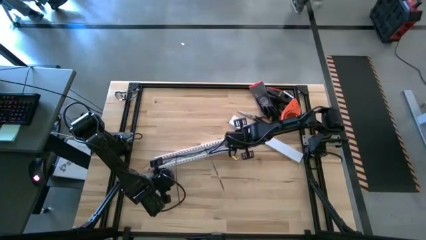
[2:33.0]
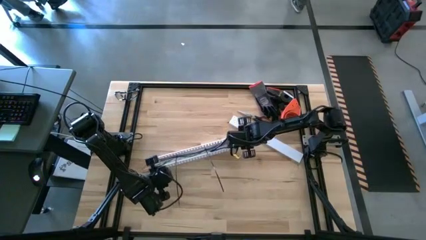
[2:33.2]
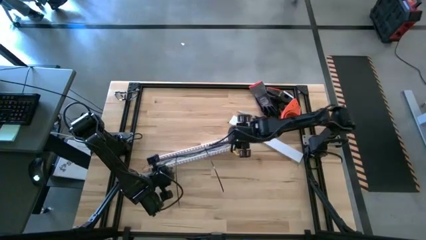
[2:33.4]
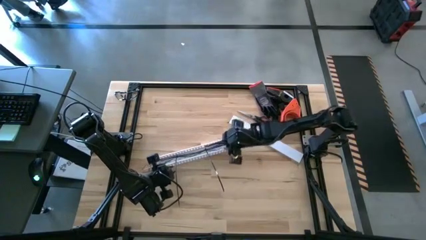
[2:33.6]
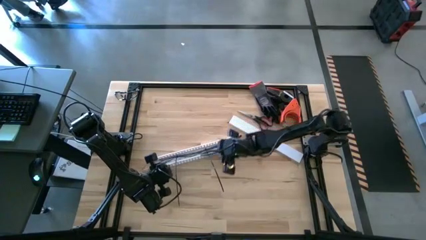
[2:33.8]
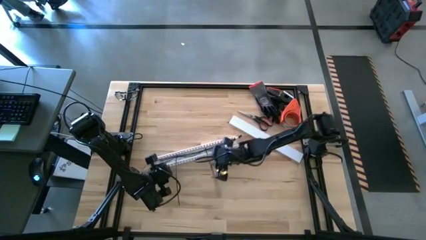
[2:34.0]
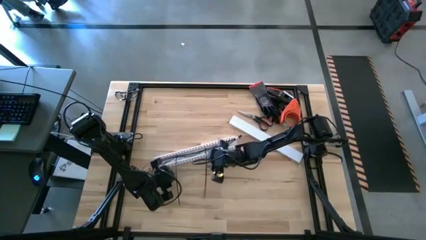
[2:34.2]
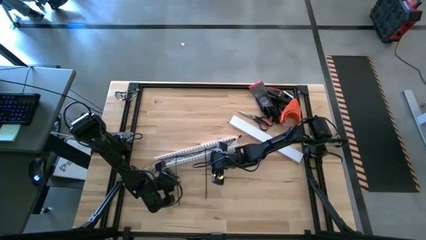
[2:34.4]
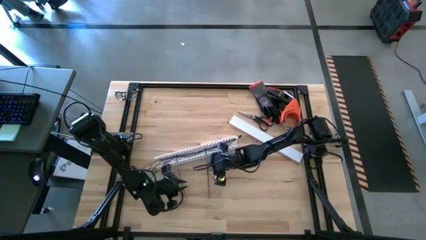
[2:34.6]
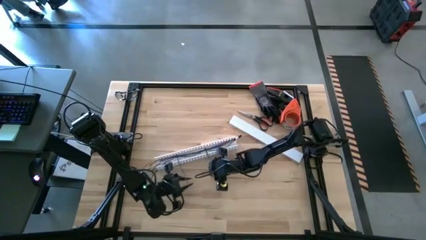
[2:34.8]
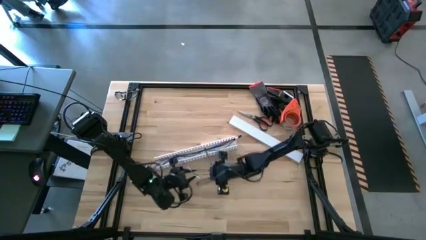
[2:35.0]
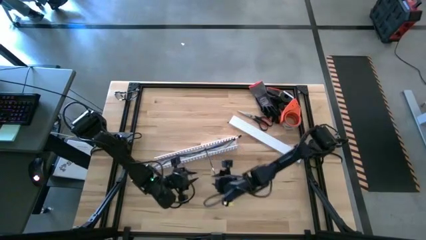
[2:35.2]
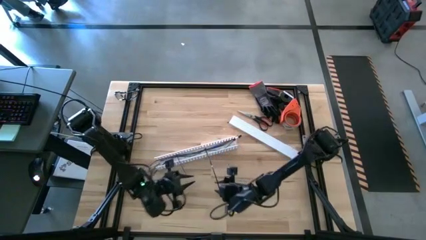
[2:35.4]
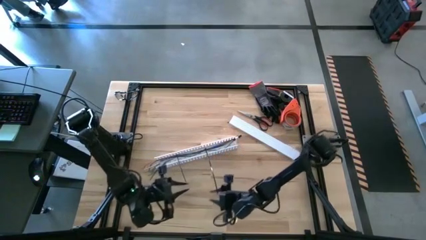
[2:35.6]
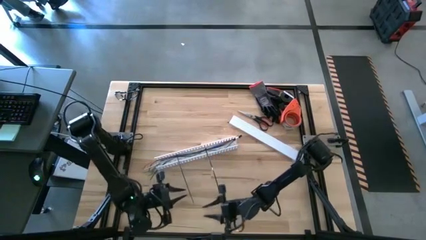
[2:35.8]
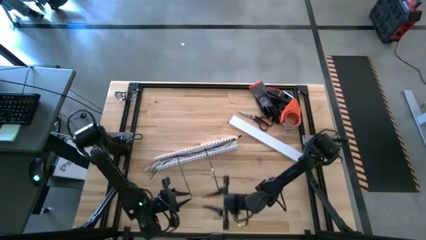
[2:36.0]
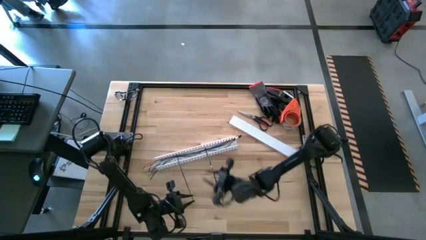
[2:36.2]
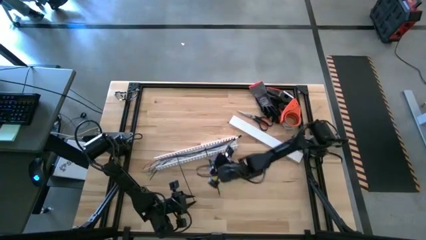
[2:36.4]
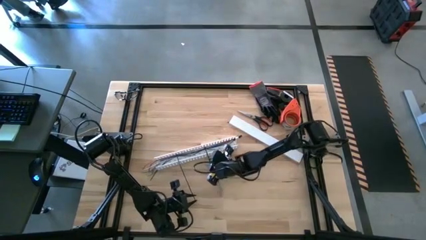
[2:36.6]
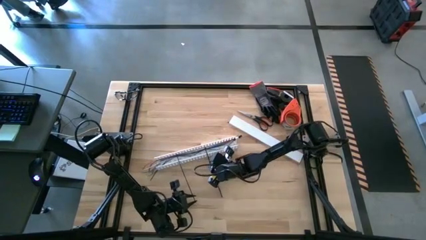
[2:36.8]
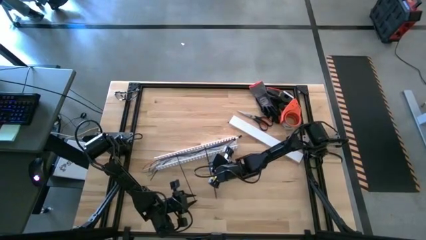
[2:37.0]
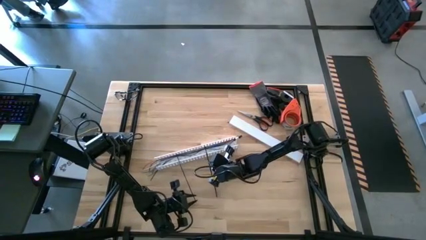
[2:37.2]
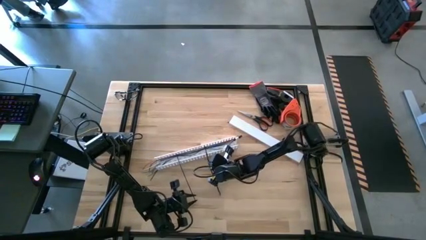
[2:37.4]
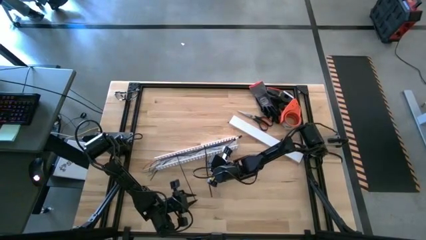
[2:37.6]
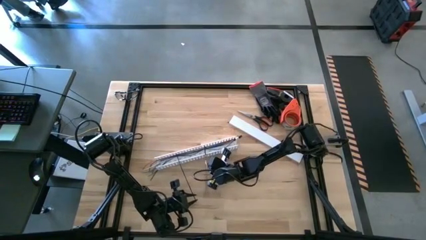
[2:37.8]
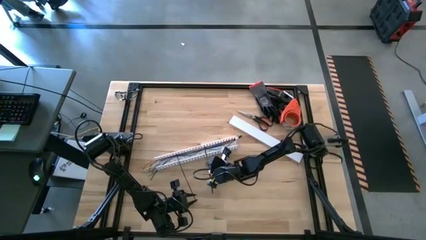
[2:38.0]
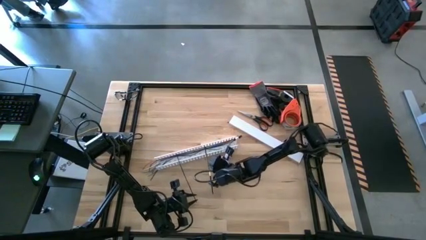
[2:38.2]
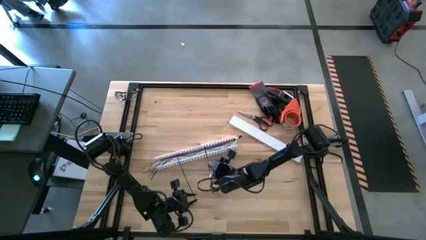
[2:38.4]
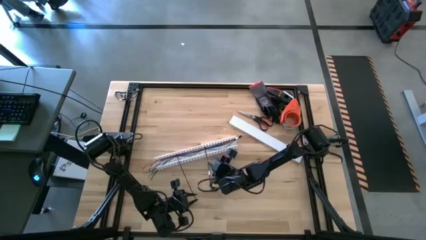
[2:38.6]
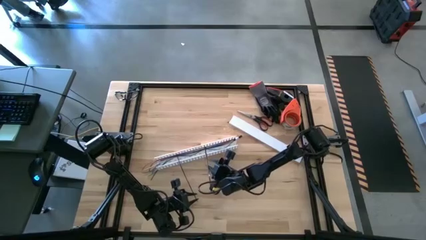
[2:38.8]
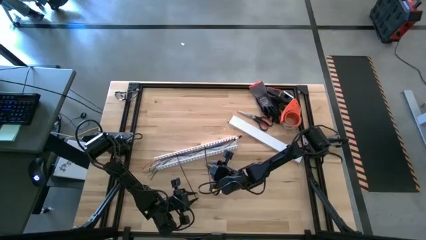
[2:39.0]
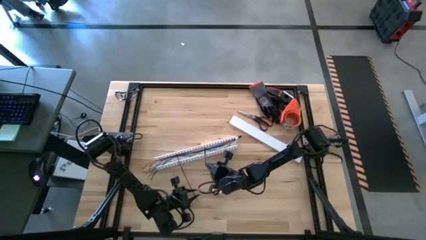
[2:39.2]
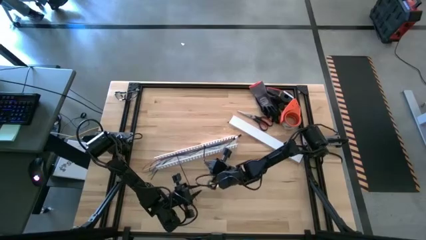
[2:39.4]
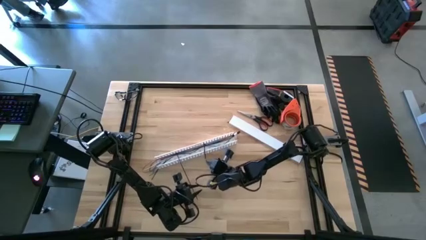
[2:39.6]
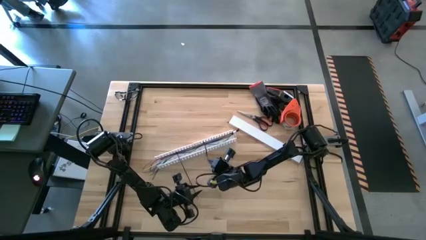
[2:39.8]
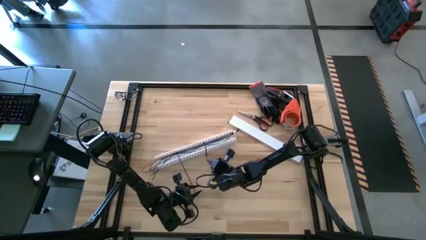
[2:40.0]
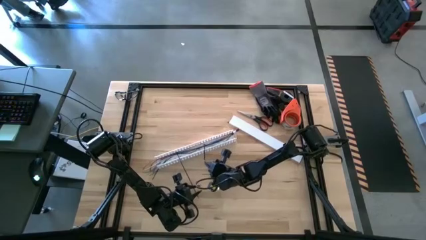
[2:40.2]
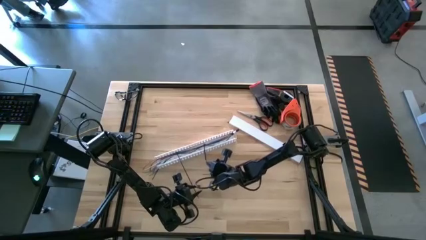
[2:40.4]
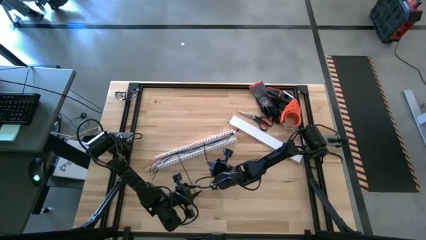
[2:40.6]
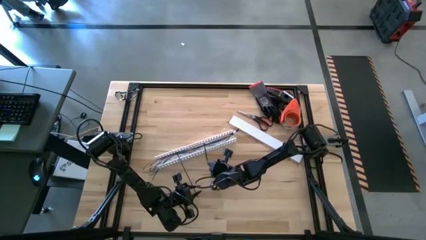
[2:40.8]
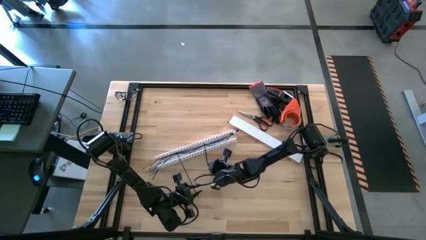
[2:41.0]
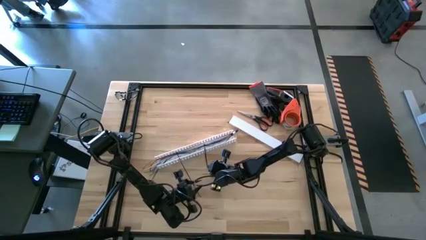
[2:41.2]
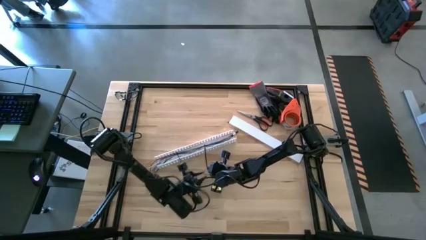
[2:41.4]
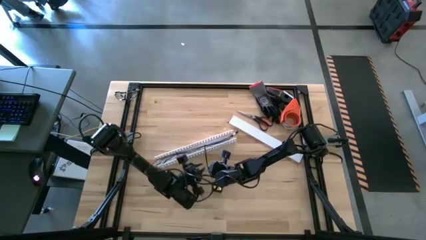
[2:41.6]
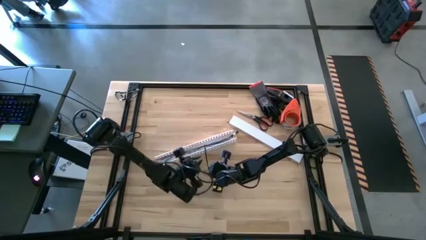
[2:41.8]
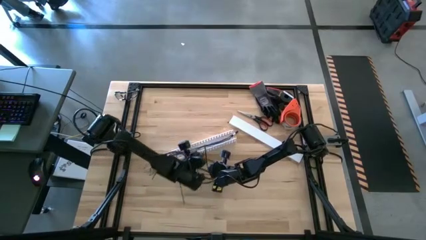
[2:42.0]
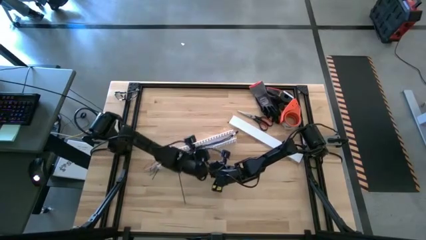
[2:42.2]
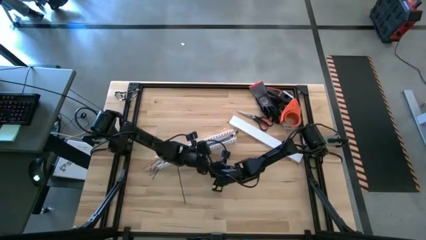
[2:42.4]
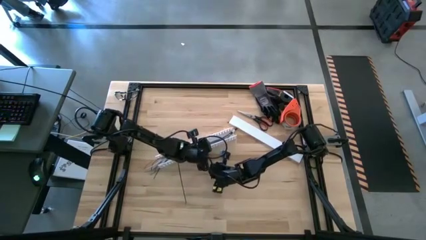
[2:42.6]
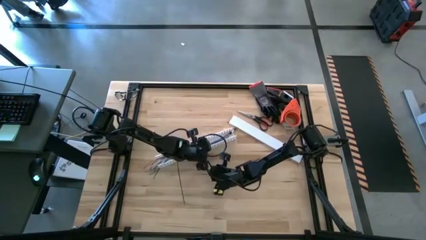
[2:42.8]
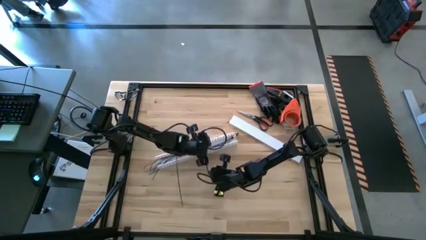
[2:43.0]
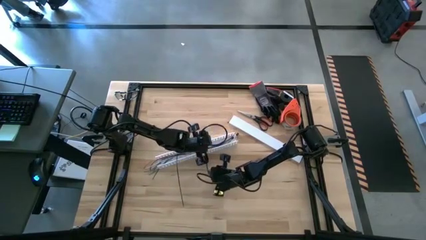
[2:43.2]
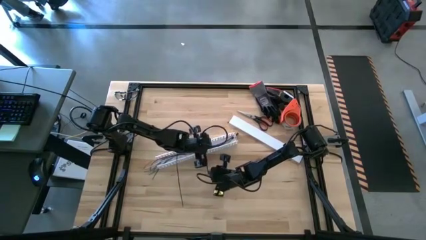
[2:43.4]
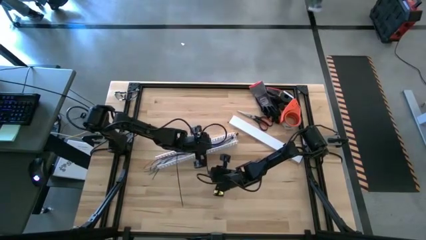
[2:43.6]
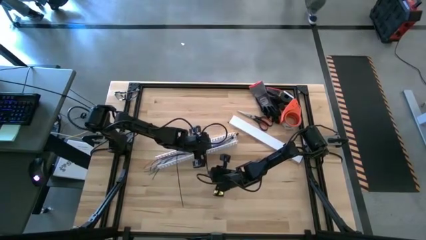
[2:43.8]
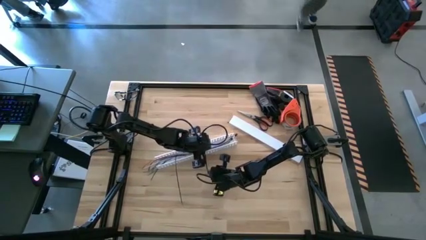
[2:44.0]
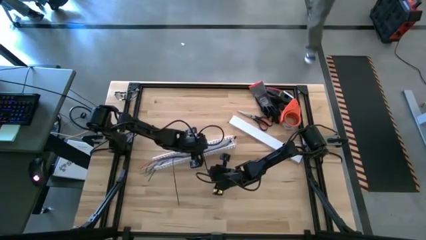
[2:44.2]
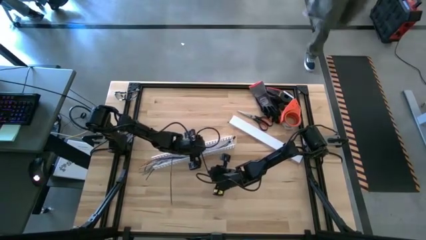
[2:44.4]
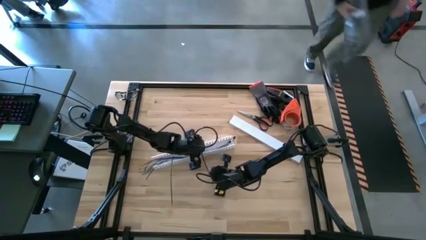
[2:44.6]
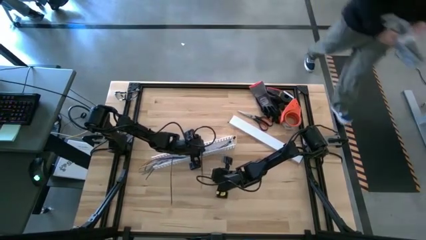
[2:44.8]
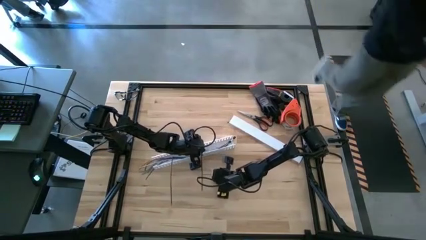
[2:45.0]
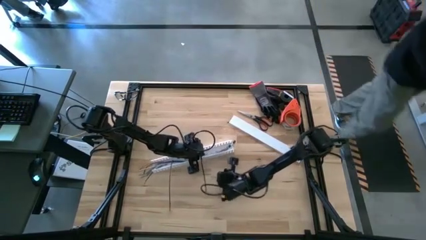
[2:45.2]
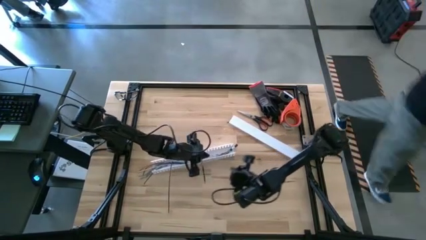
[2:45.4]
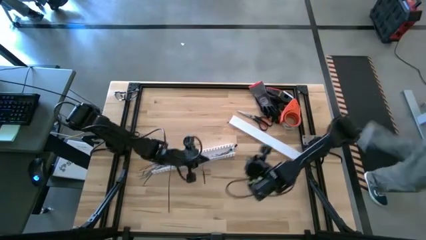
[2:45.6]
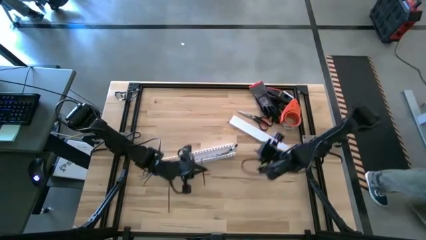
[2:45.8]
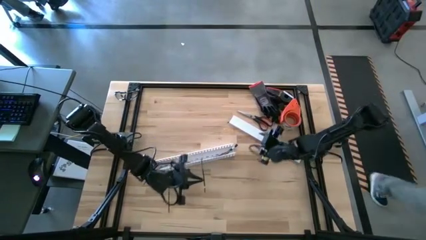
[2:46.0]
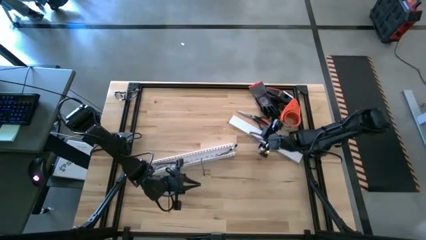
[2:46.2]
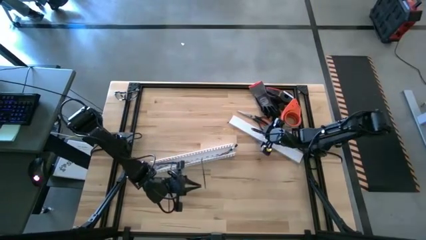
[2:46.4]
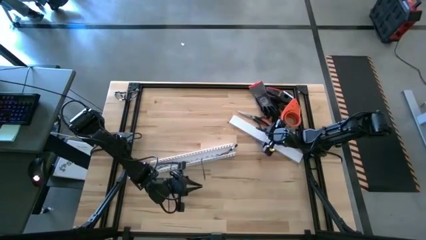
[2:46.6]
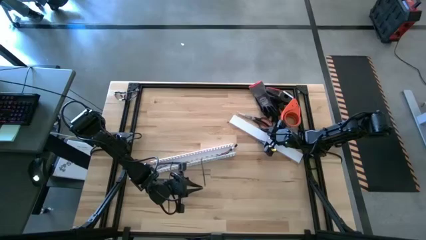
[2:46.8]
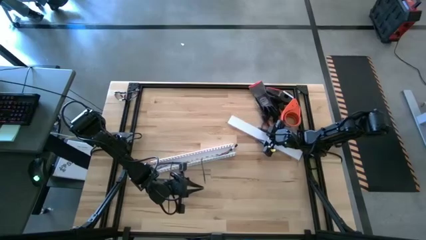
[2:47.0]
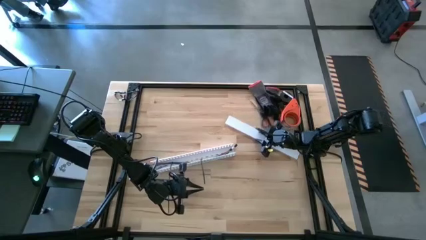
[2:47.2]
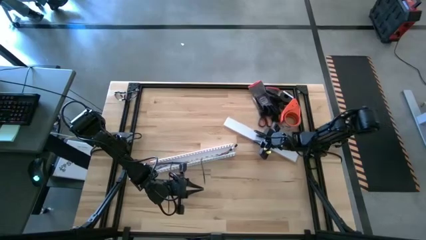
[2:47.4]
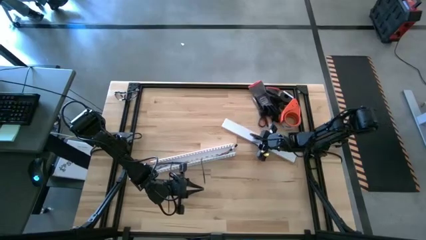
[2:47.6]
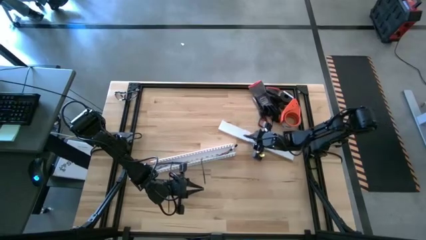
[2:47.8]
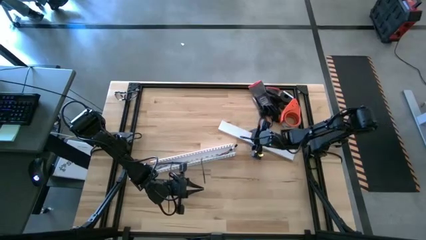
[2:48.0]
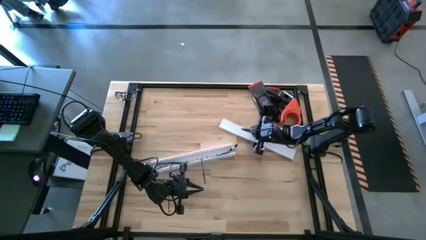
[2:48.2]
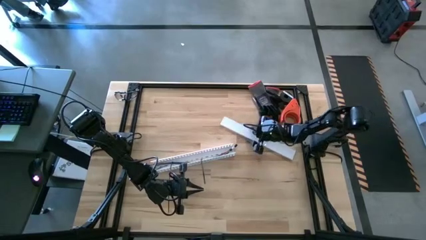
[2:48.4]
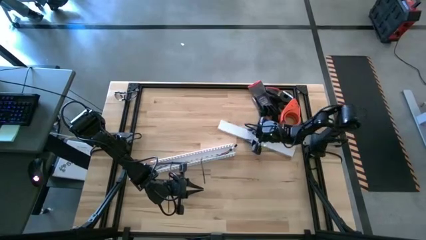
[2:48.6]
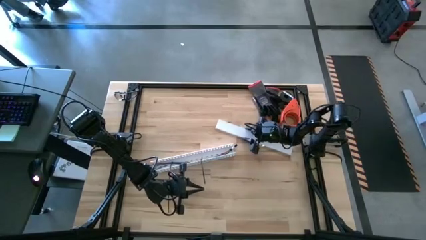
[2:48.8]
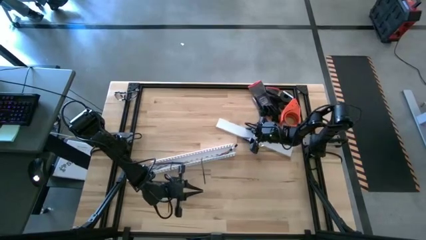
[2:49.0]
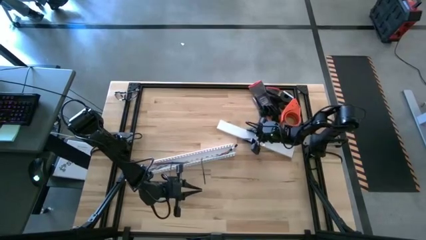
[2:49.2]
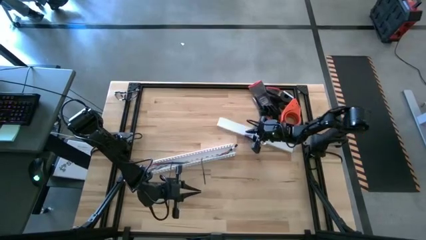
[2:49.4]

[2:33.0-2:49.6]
Task: Ziptie cables
Close the cable duct
